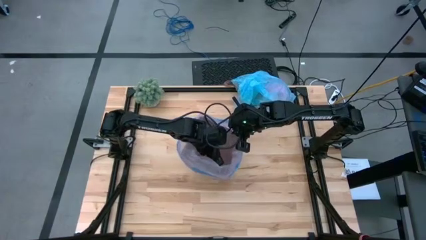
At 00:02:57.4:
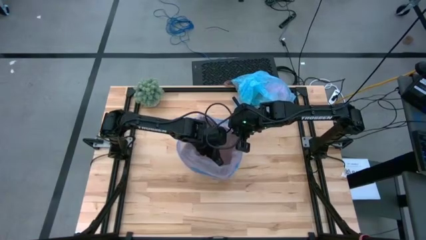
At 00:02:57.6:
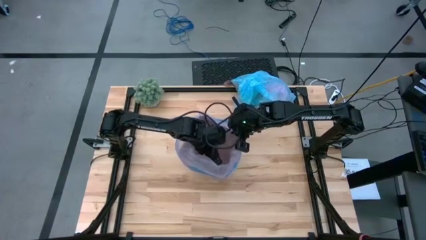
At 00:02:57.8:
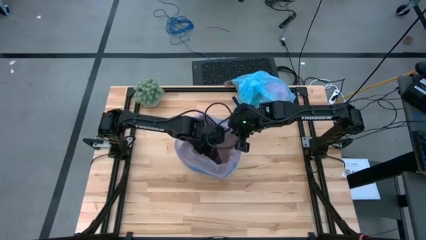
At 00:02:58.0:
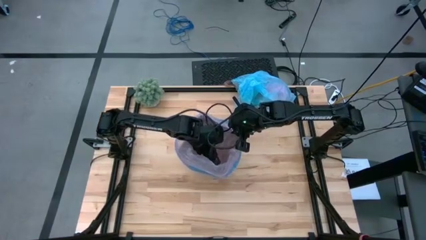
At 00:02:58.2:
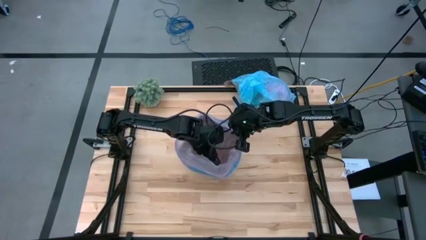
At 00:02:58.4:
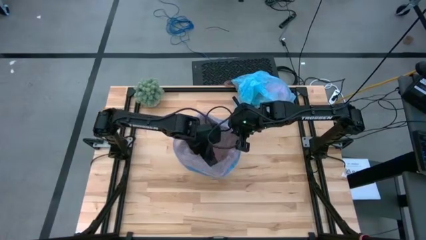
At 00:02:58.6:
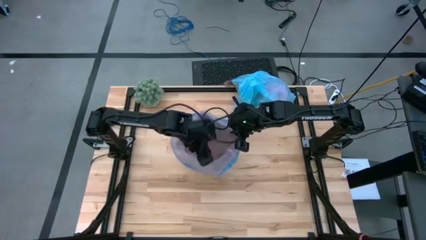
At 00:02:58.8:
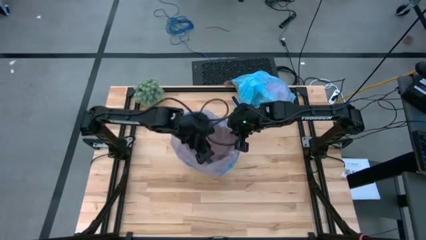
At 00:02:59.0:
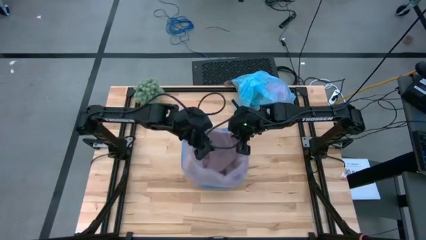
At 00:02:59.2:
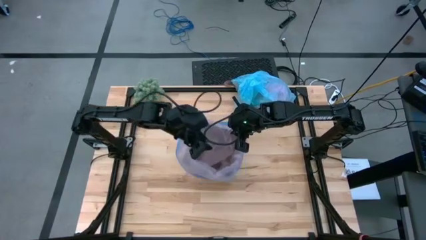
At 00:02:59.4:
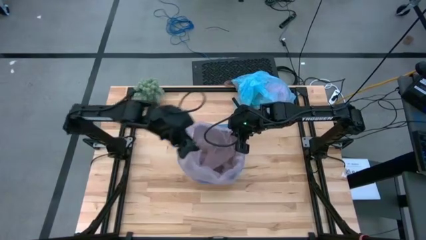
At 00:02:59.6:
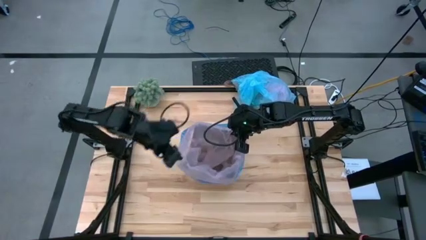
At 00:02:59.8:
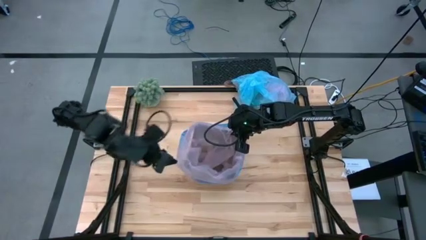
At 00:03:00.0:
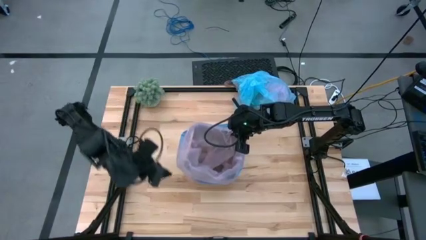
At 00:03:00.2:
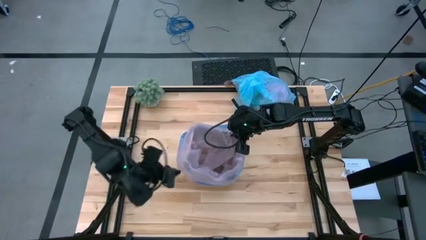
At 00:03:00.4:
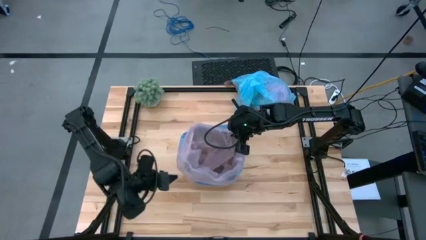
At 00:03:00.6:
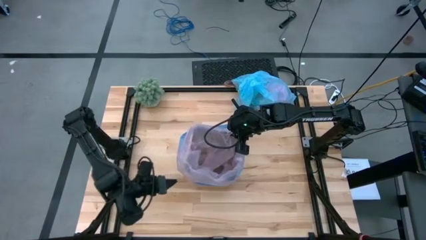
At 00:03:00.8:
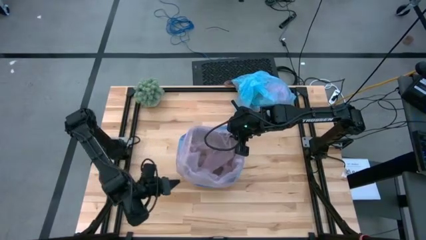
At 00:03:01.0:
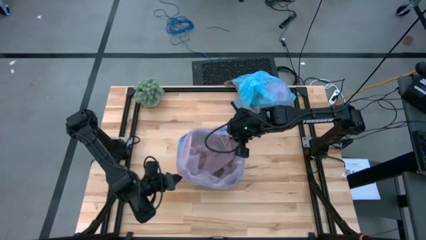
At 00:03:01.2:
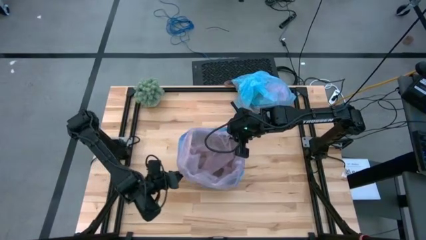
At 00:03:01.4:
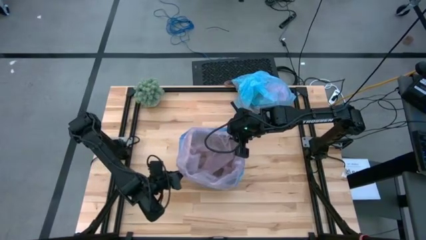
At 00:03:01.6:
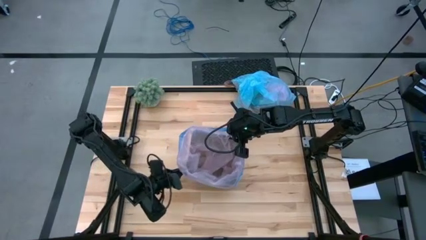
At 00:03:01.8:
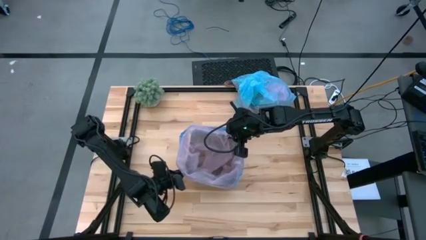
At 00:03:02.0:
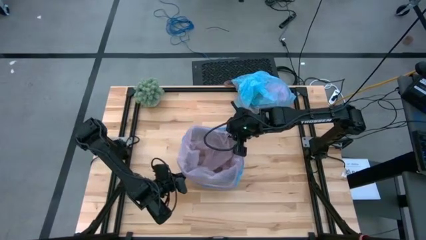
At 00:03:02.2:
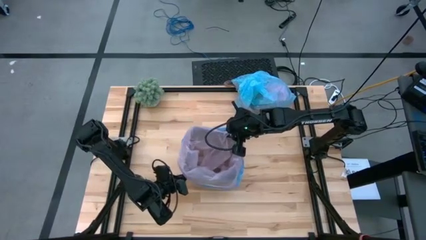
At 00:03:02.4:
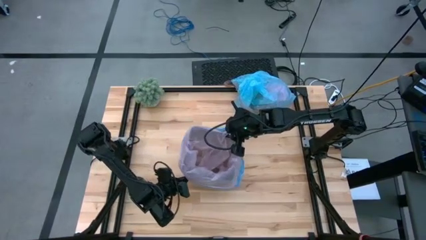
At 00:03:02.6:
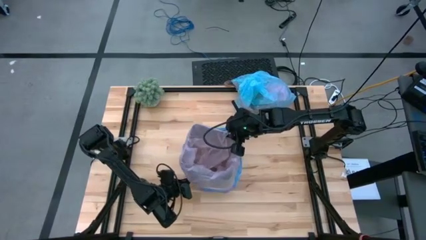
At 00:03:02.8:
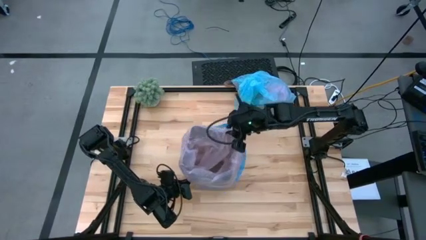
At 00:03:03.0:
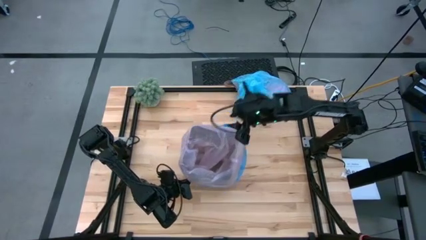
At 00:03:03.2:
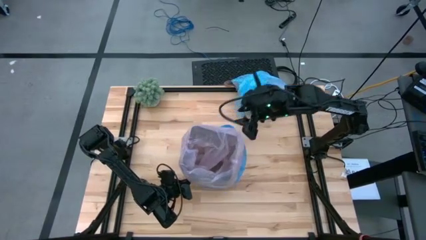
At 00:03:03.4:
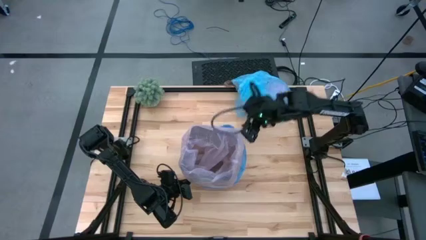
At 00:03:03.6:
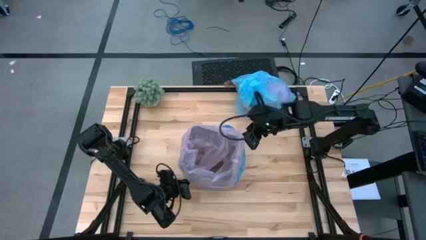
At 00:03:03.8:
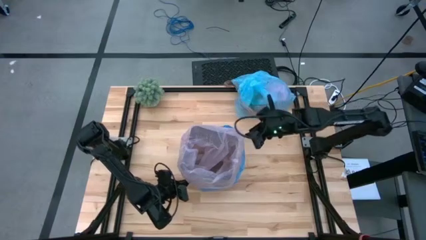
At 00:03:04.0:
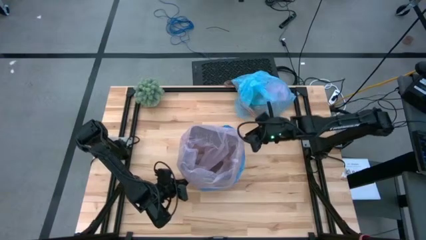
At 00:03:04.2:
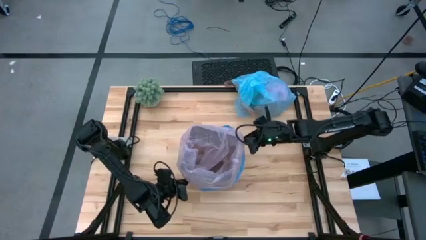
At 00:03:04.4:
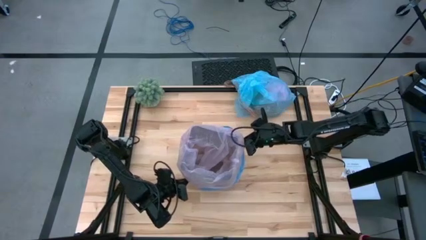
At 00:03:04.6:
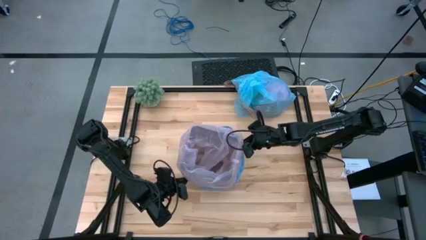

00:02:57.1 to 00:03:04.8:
Task: place trash/remove bag and relplace
Insert the pink trash bag into the trash bin

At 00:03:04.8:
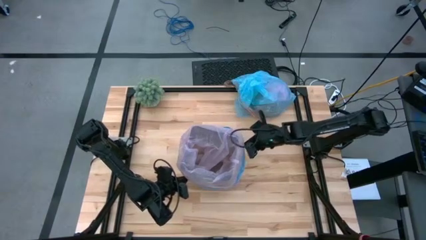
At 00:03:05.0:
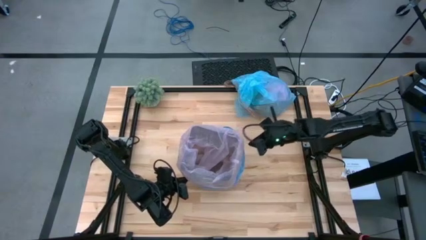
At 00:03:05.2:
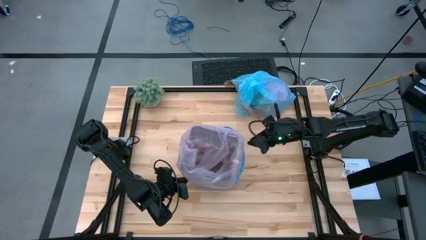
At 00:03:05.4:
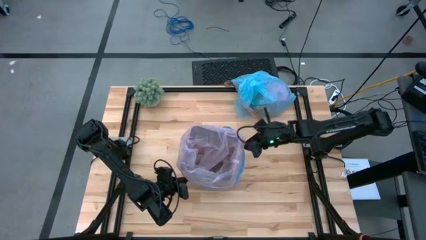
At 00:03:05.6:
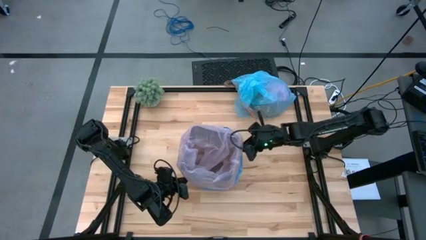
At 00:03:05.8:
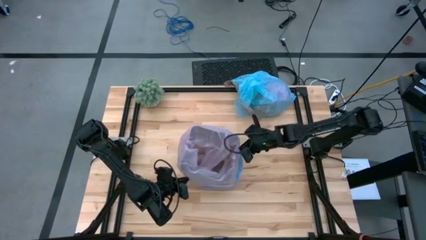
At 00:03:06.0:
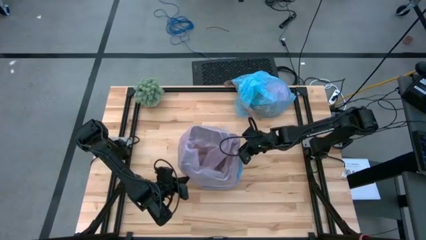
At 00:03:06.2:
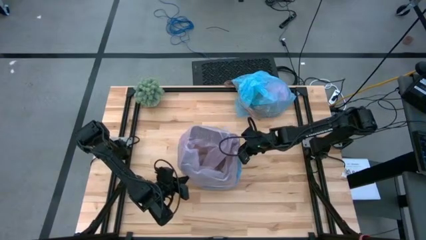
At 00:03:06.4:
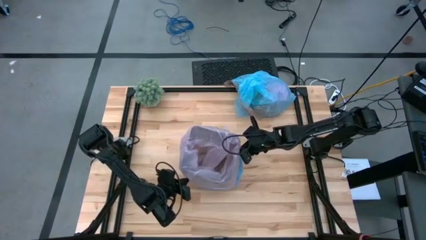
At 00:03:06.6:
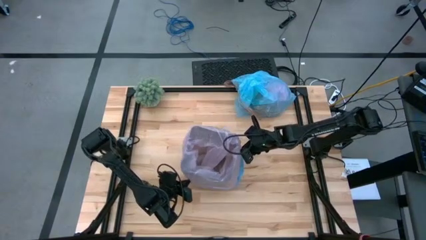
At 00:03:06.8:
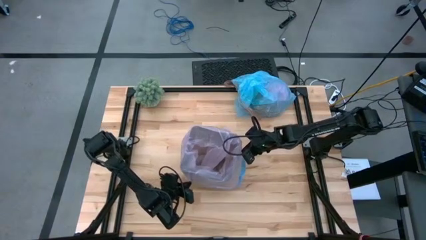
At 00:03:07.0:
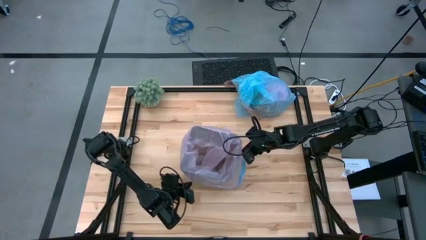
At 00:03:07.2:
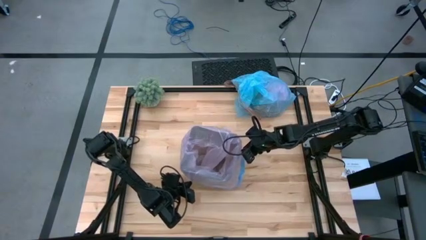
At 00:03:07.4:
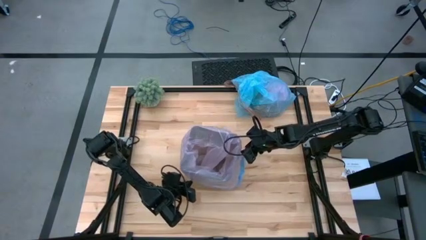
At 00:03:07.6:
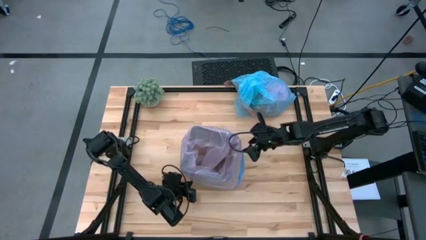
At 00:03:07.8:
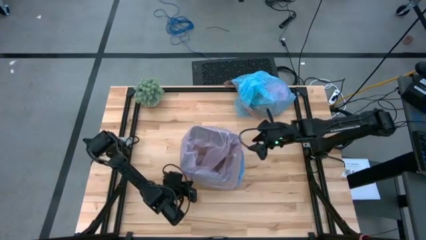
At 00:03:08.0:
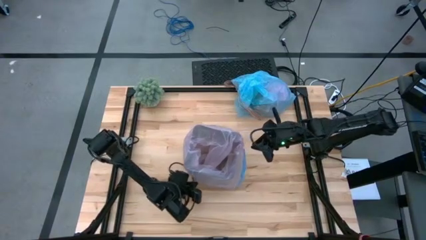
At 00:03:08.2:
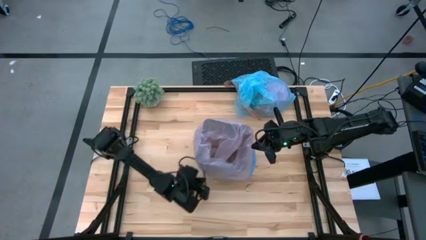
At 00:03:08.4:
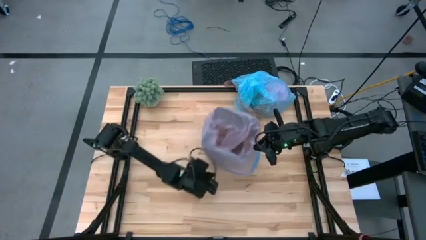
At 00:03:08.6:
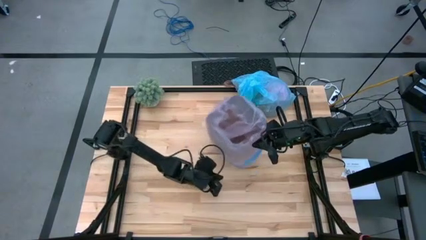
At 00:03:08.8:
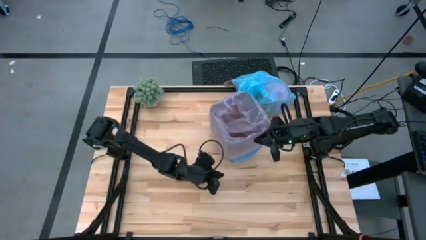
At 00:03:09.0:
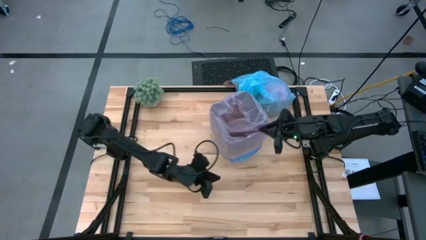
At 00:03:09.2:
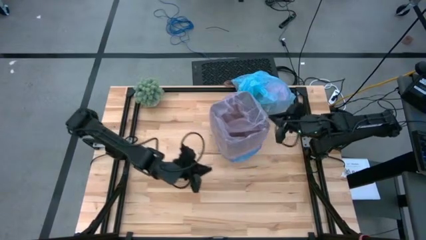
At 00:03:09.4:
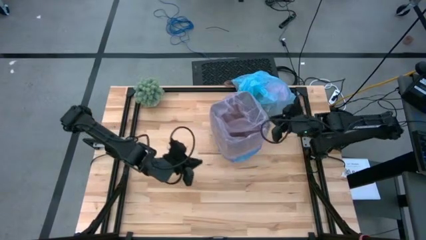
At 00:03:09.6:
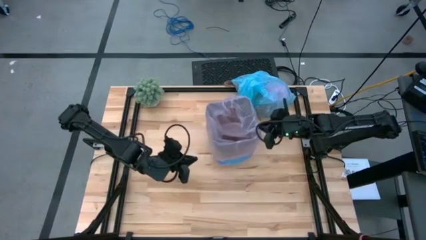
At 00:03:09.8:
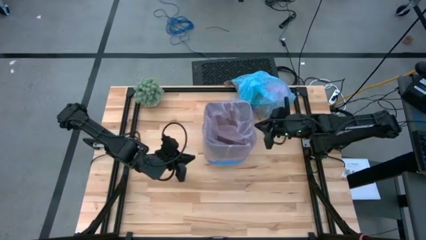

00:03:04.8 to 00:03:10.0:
Insert the pink trash bag into the trash bin

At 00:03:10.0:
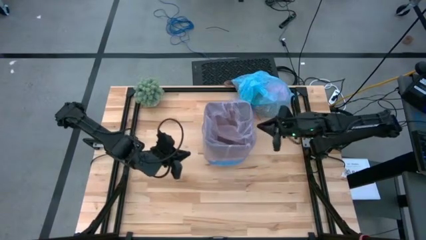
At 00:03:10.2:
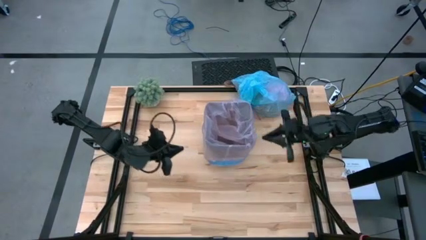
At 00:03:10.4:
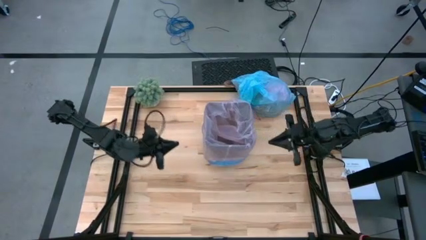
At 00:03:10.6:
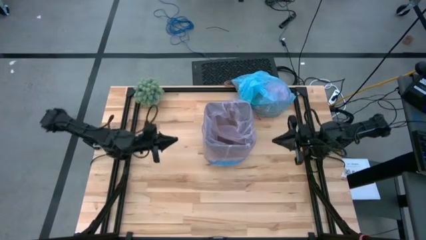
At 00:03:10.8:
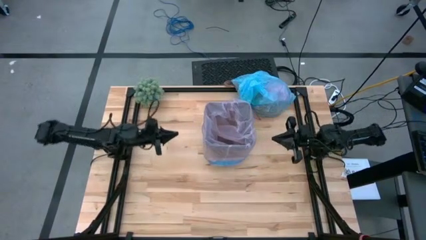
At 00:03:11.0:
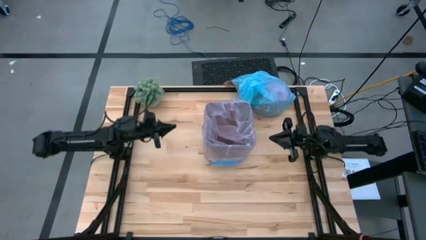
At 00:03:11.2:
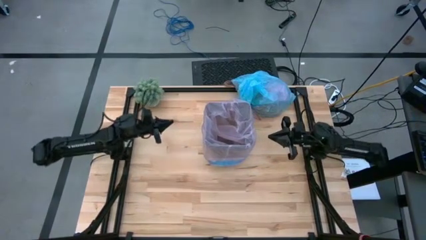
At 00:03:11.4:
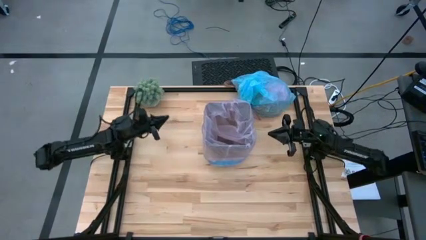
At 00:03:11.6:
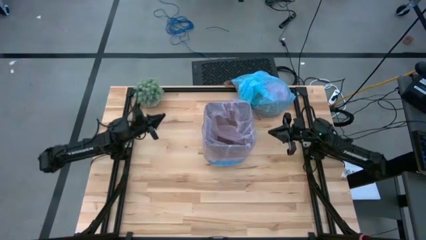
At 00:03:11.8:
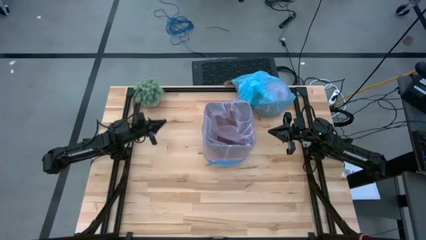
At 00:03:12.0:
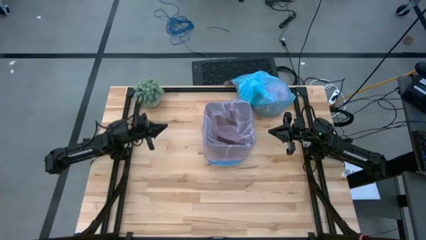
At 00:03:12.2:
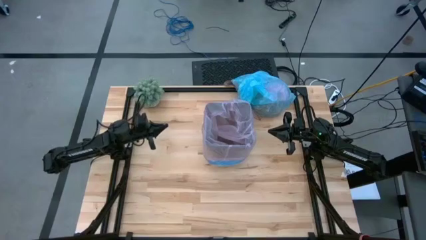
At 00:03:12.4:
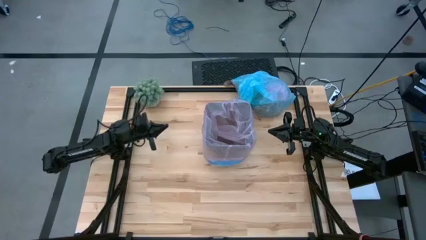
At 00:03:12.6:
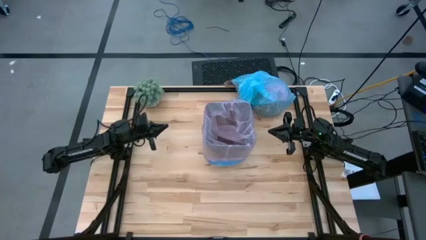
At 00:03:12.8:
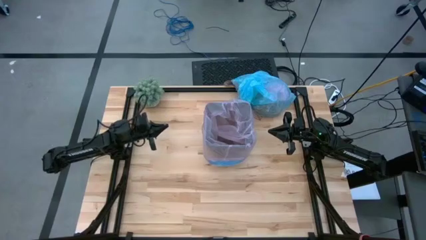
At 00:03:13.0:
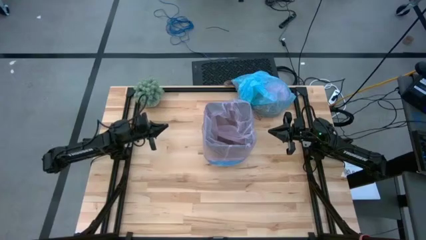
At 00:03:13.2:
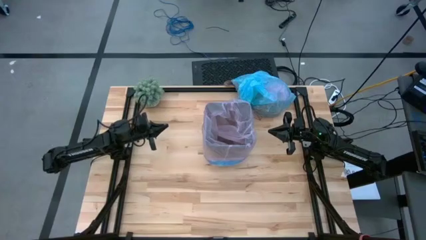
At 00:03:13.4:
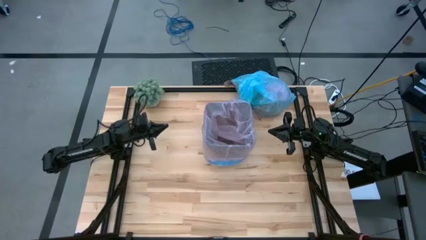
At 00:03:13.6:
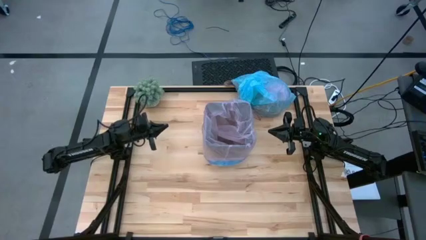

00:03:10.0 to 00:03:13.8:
Return to Home Position
